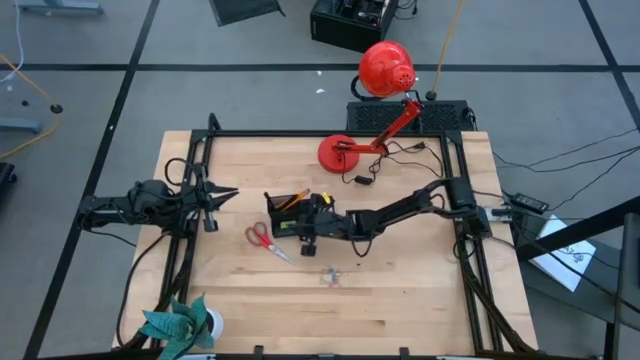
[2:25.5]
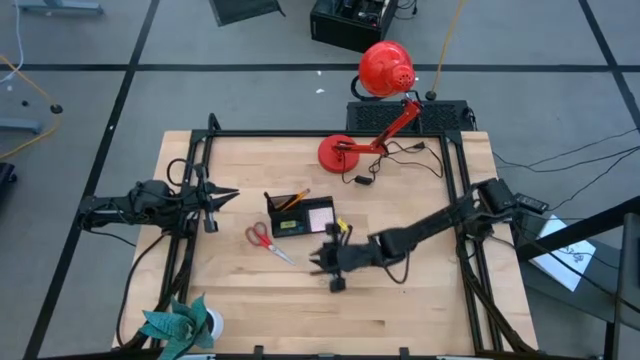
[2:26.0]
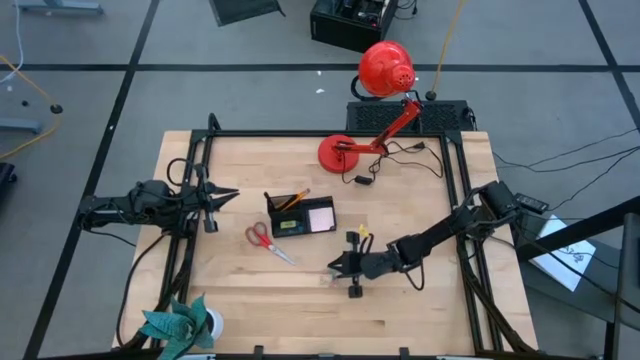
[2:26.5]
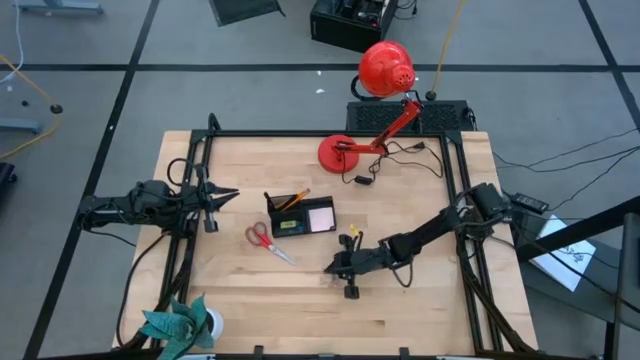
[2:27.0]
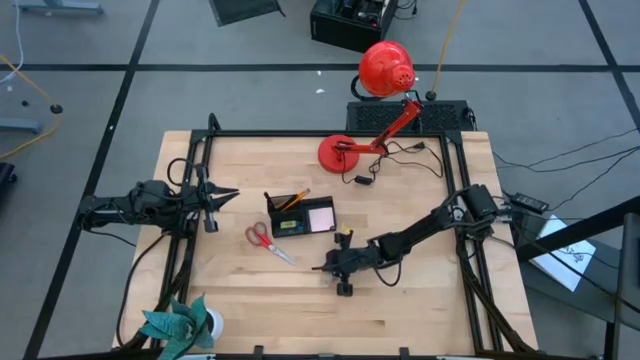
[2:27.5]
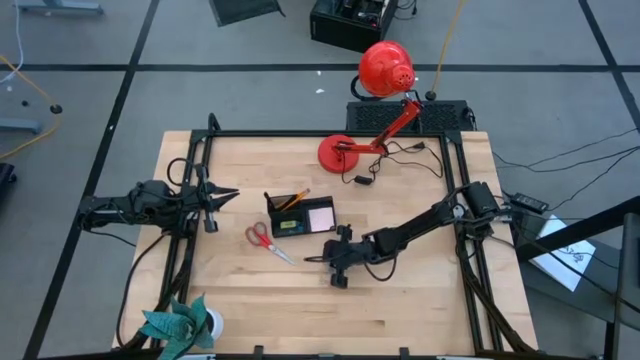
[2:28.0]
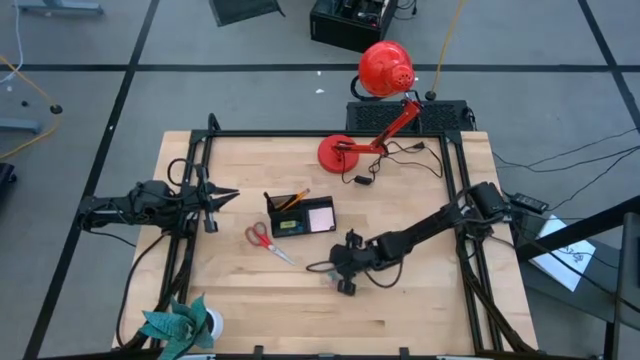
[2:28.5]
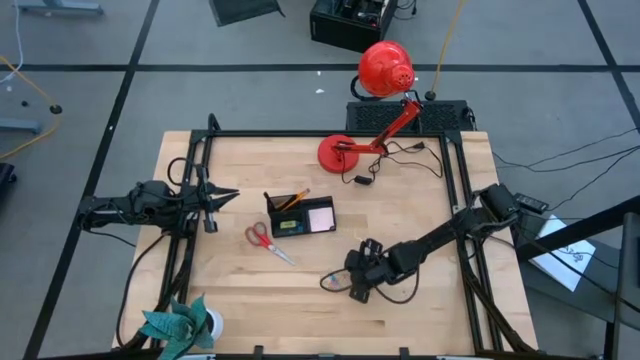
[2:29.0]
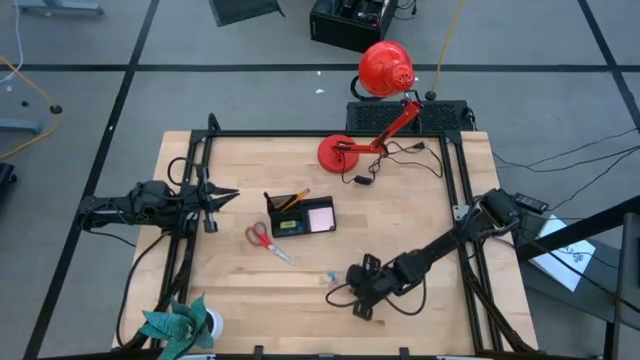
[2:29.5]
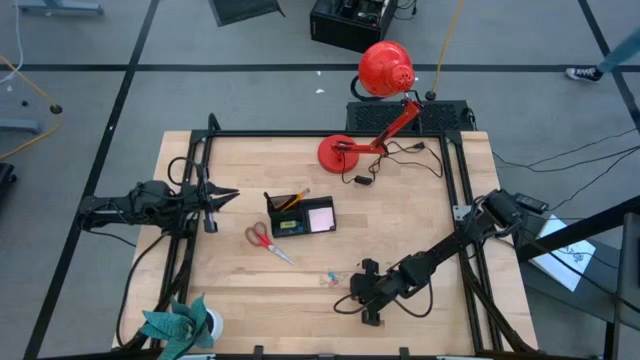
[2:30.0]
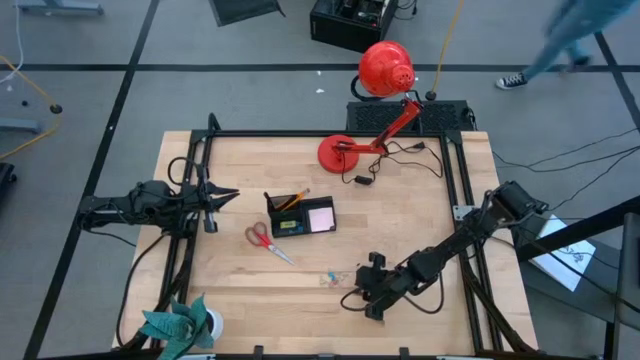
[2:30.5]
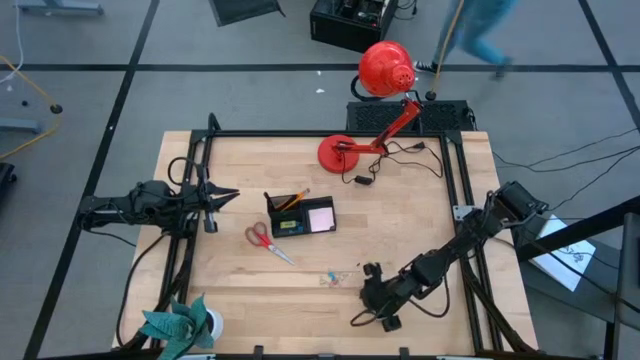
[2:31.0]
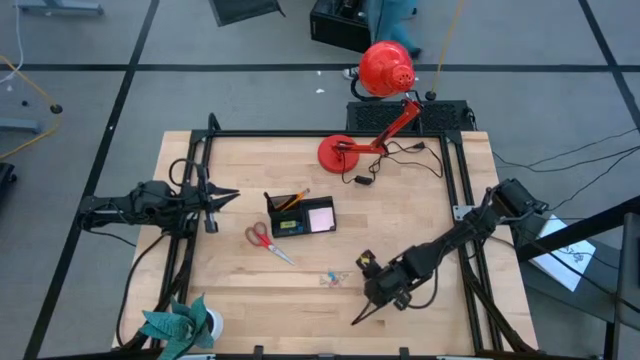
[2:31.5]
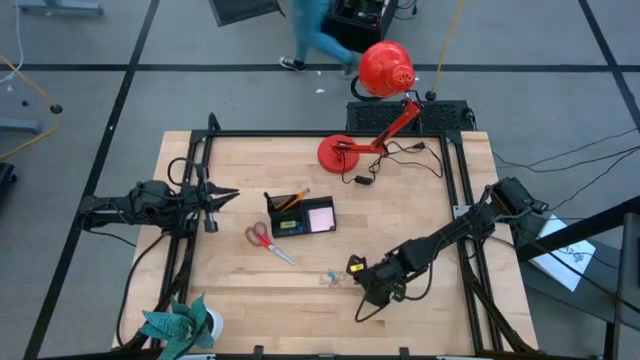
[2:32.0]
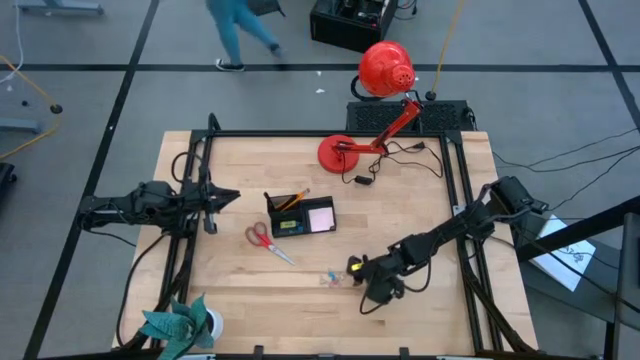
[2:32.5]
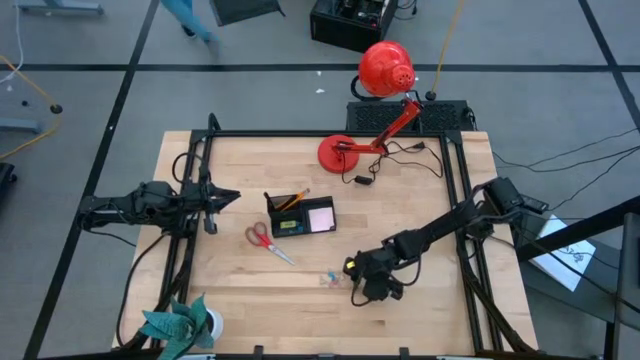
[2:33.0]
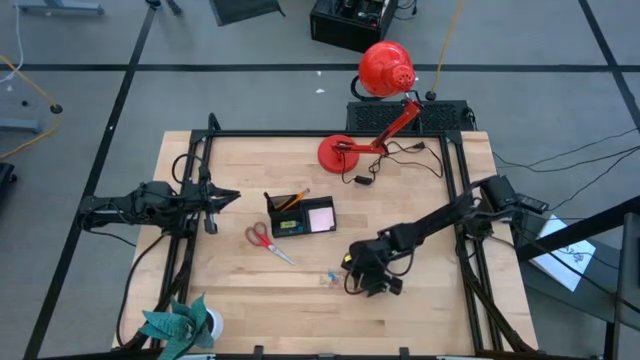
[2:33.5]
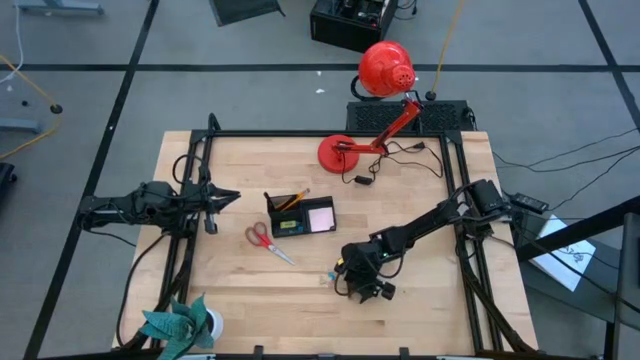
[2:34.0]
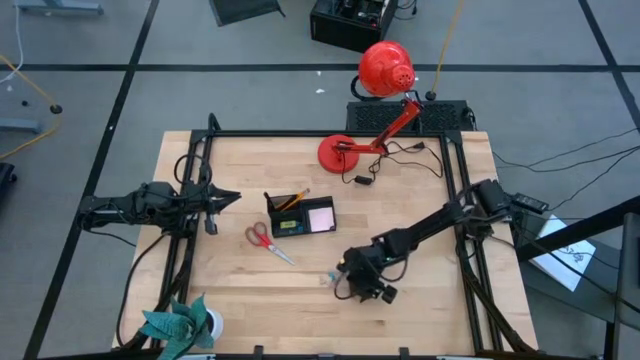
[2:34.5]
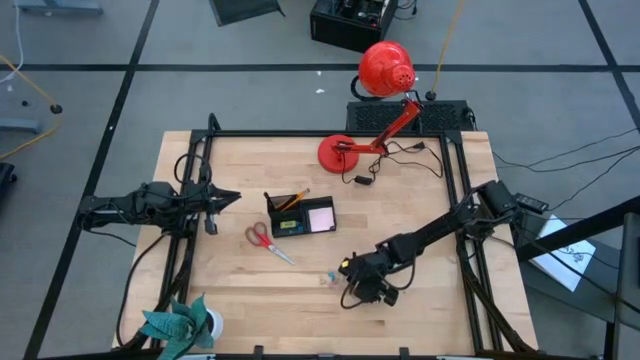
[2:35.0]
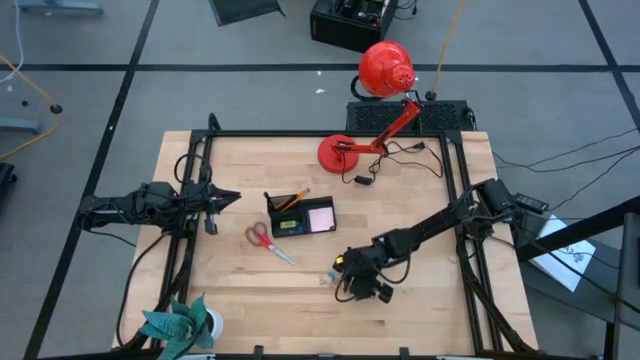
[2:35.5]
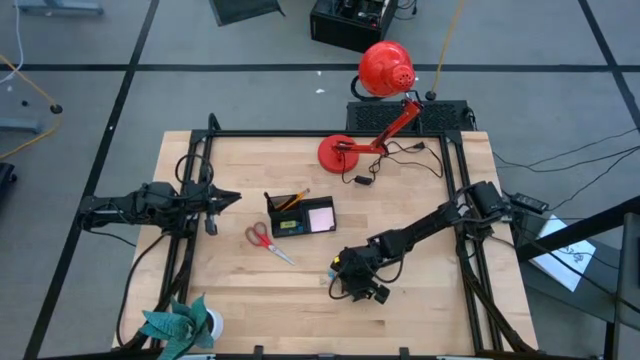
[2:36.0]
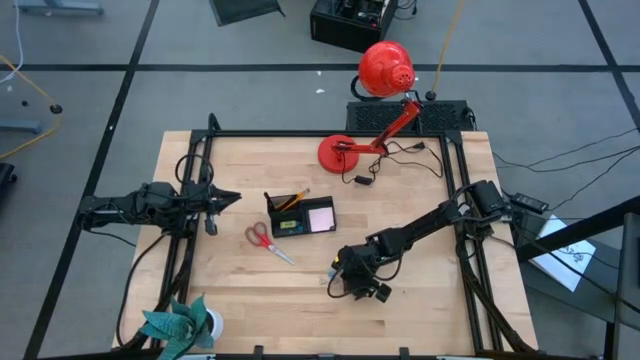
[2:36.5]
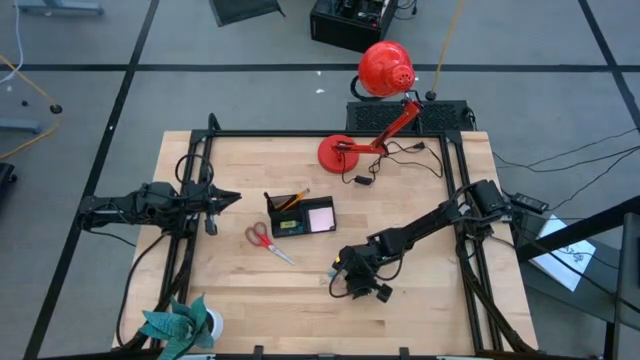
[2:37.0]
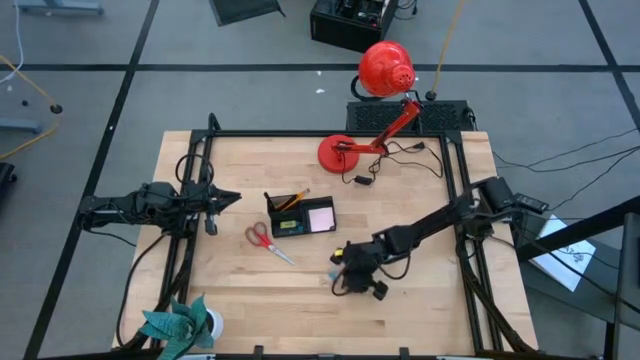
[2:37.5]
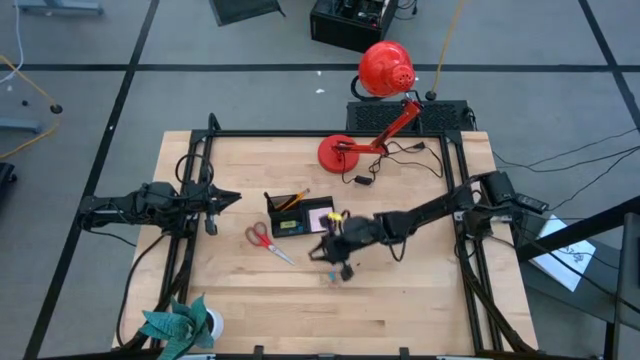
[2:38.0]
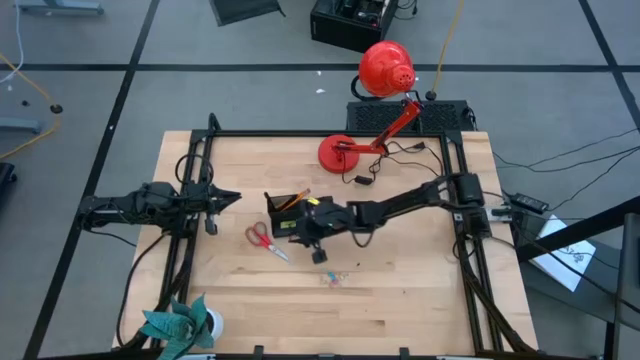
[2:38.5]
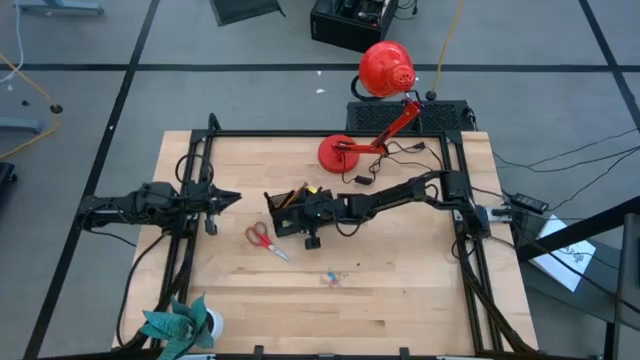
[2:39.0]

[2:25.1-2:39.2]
Task: Pick and place office supplies into organizer
Put the pink binder clip into the mesh desk organizer

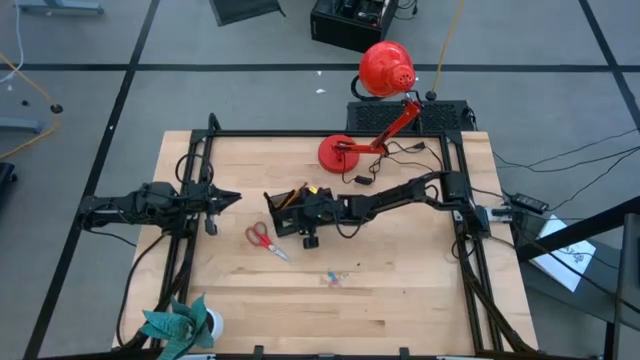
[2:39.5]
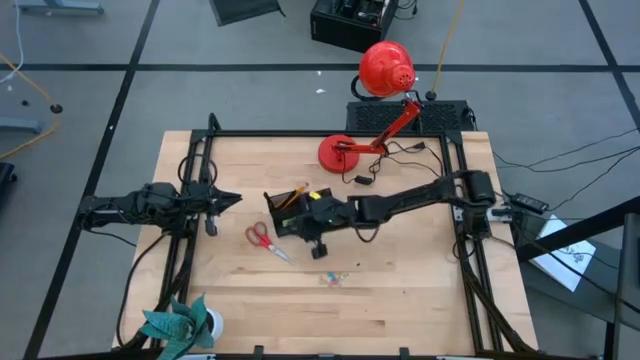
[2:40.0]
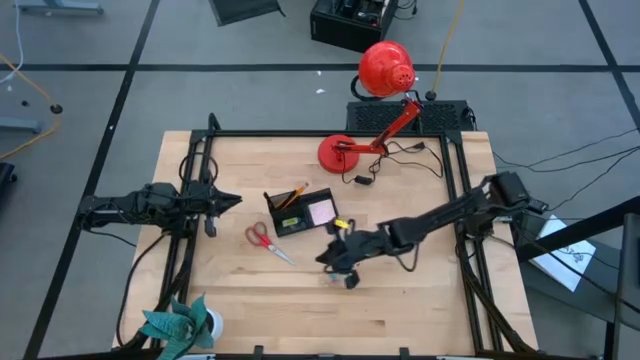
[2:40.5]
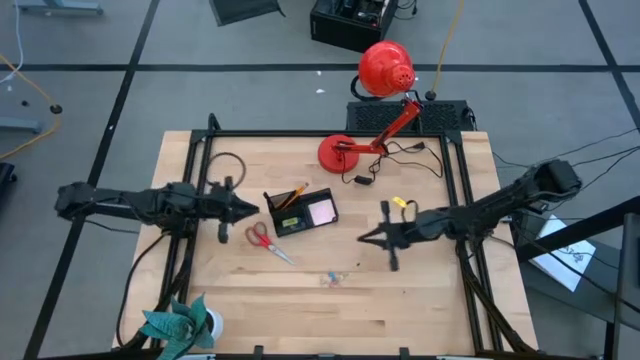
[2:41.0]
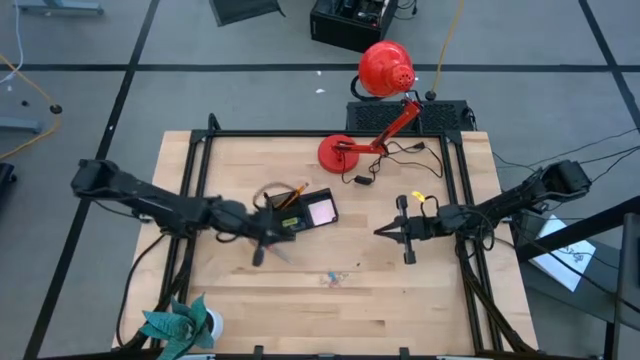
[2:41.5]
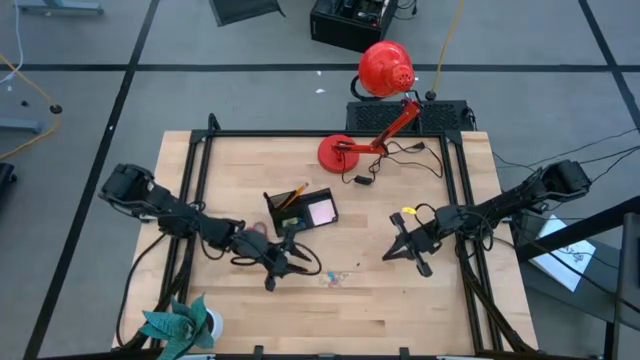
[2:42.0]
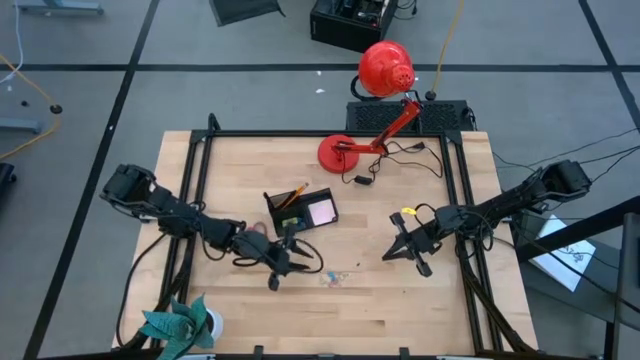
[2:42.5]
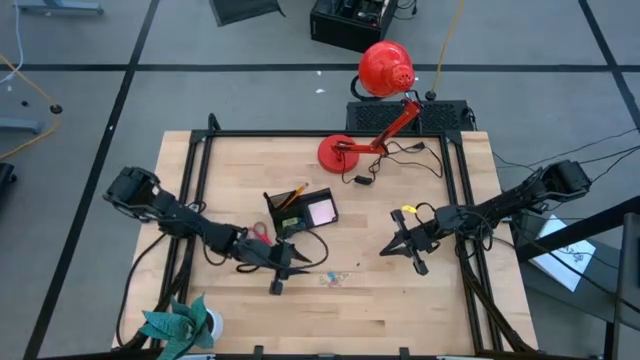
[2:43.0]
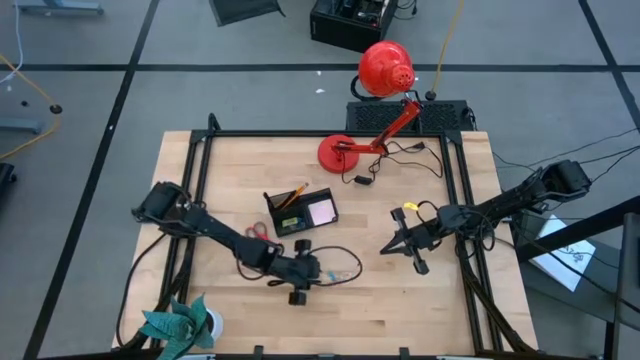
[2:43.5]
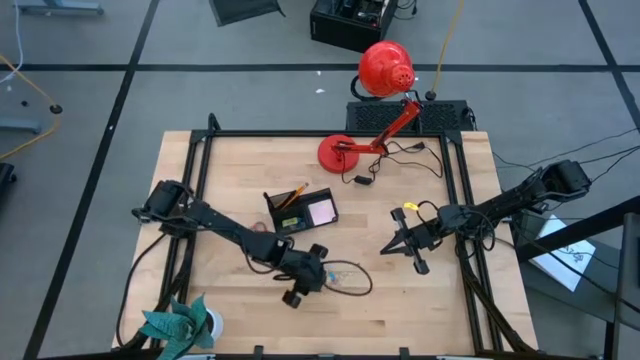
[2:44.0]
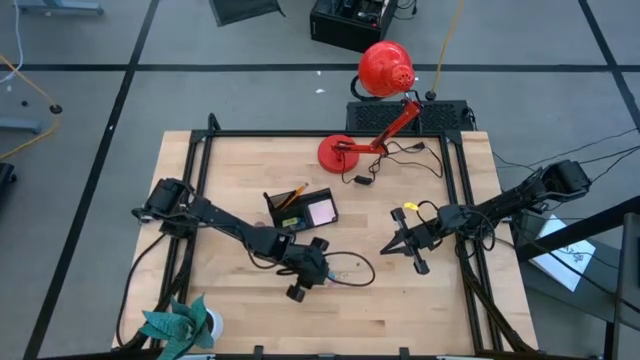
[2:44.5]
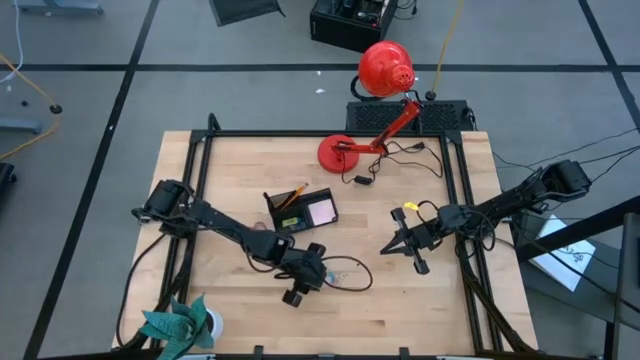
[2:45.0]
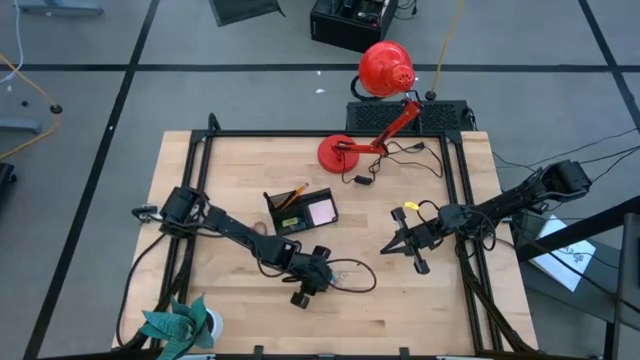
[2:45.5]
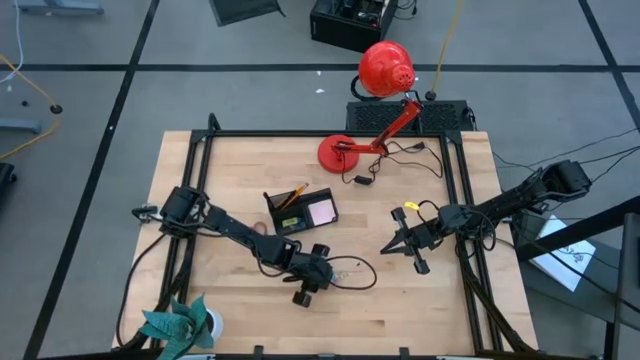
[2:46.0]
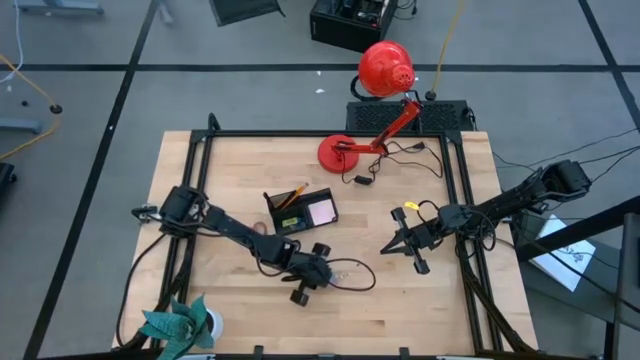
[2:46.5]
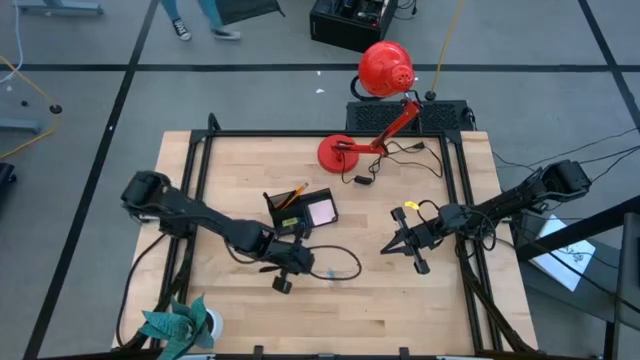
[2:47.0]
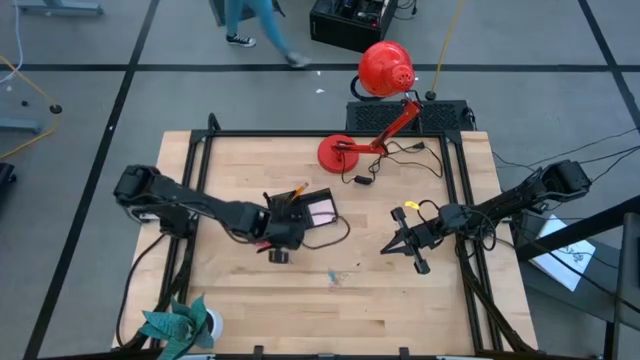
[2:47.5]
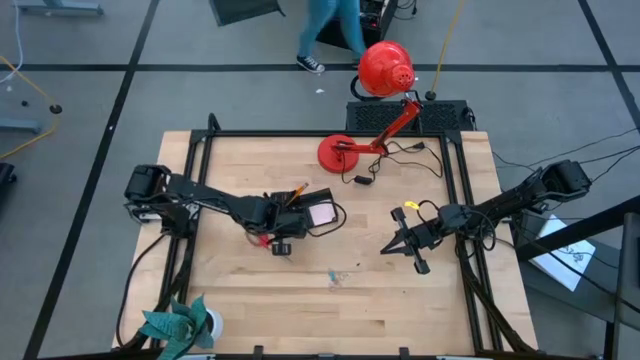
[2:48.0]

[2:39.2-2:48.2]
Put the light yellow binder clip into the mesh desk organizer
